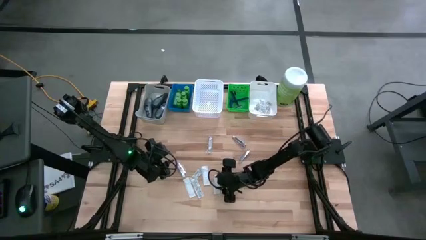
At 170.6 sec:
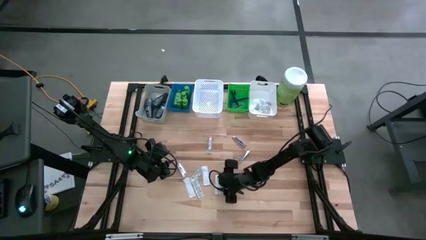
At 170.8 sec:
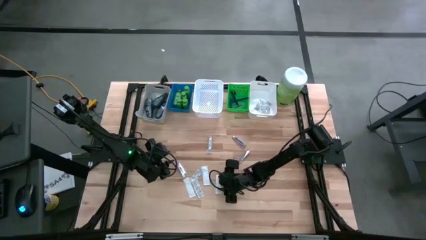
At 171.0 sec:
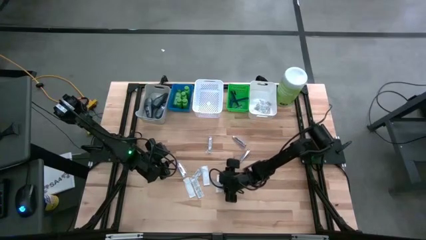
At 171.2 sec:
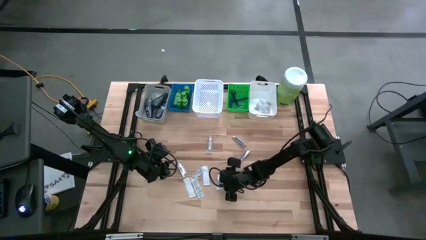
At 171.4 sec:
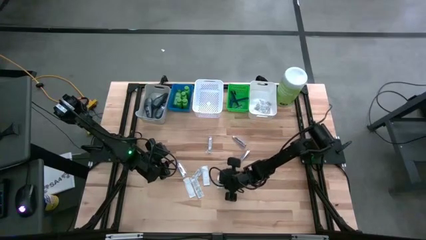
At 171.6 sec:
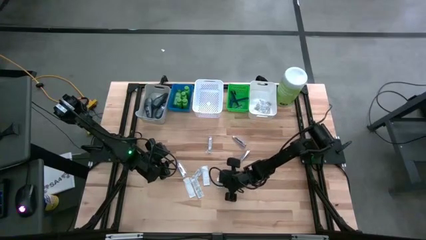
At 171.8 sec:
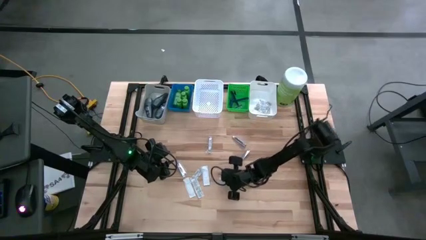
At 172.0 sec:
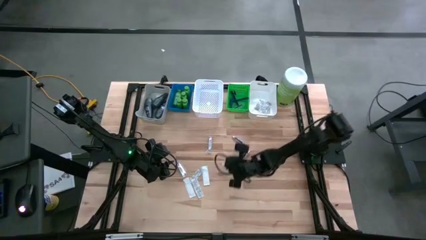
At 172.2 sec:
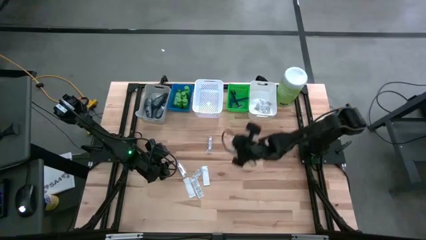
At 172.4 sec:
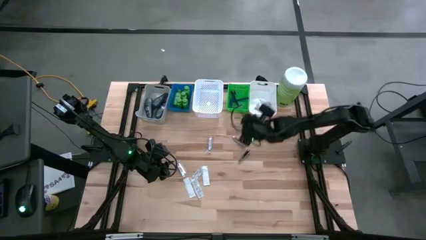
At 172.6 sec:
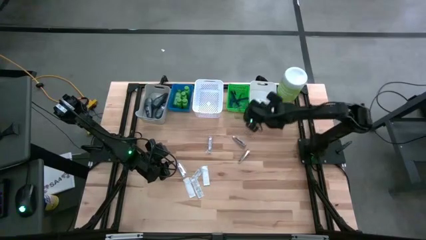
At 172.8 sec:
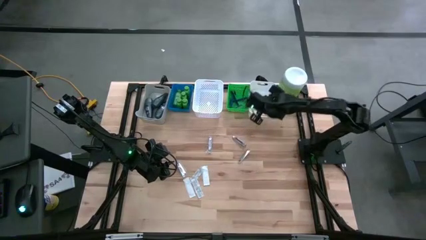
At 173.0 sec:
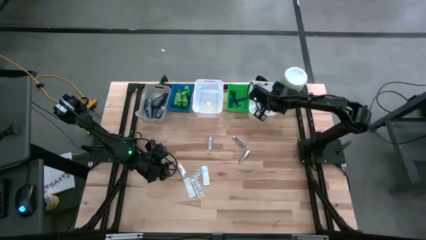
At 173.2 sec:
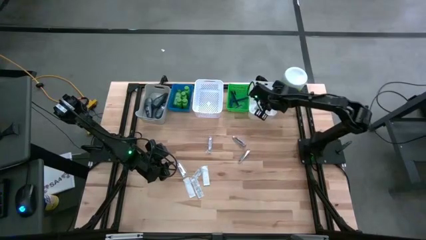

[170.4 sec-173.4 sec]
Task: Pick & Place Travel size toiletries
Put the bandage into the right white bin

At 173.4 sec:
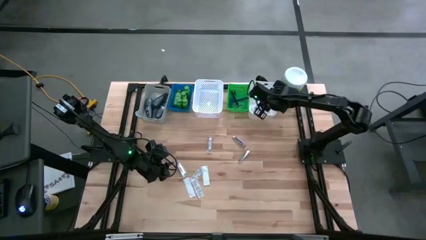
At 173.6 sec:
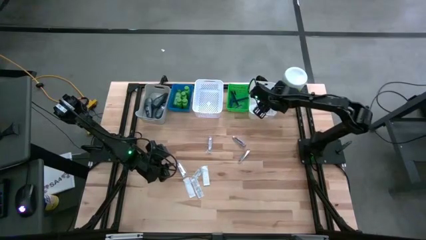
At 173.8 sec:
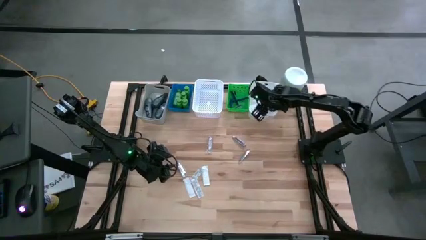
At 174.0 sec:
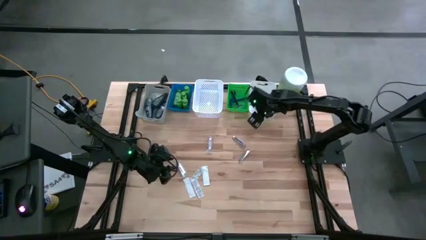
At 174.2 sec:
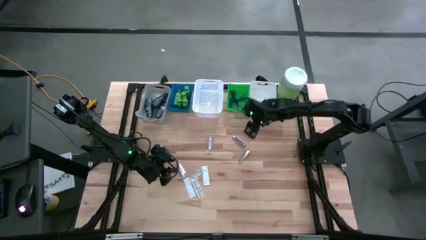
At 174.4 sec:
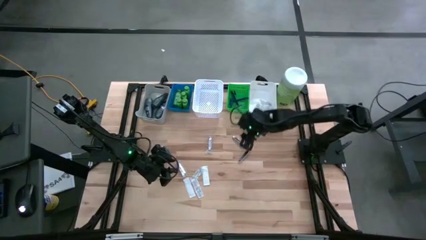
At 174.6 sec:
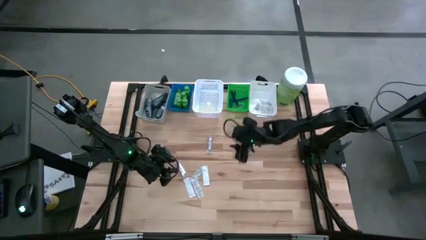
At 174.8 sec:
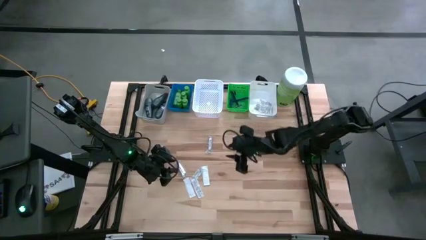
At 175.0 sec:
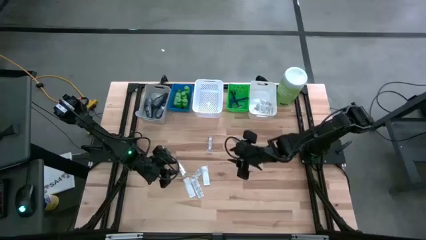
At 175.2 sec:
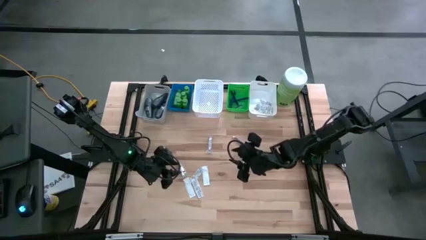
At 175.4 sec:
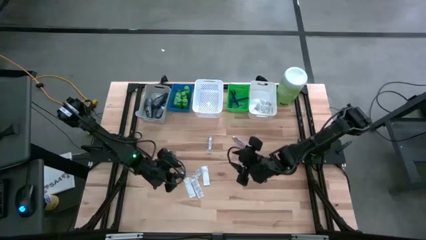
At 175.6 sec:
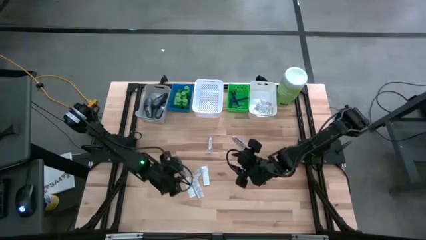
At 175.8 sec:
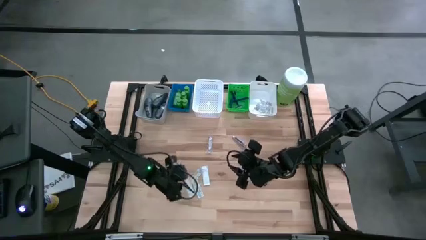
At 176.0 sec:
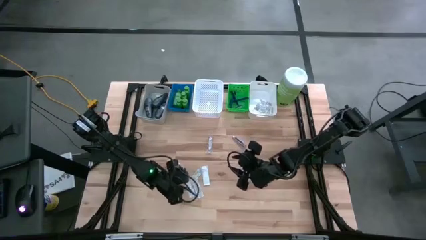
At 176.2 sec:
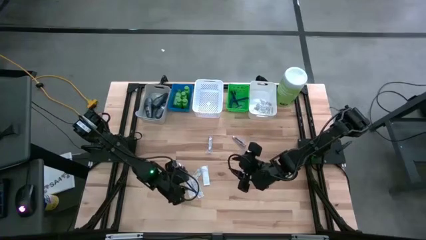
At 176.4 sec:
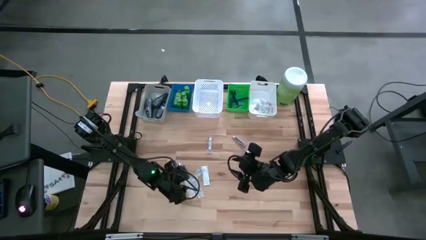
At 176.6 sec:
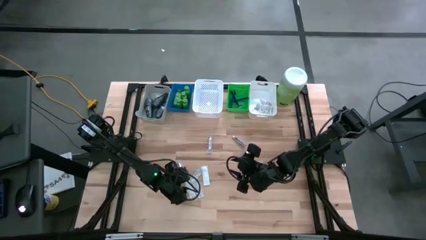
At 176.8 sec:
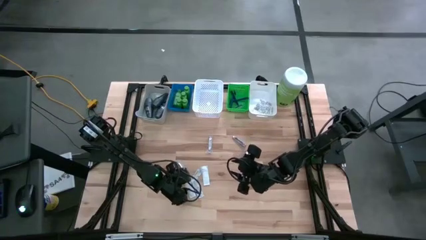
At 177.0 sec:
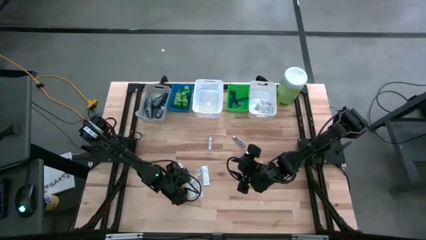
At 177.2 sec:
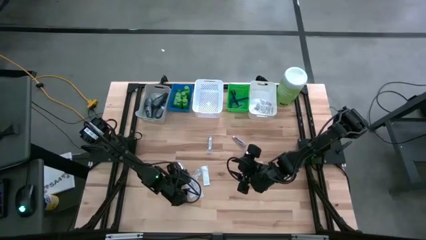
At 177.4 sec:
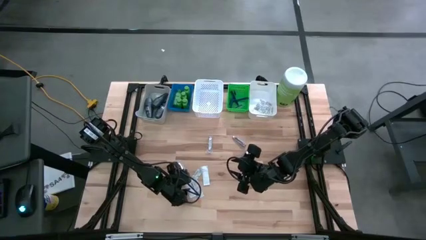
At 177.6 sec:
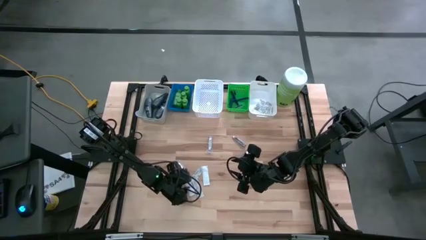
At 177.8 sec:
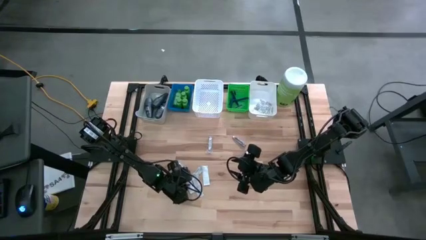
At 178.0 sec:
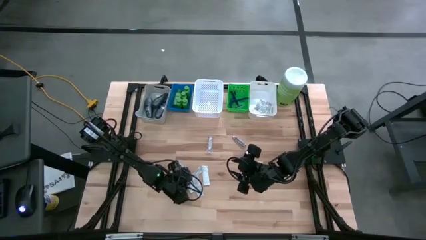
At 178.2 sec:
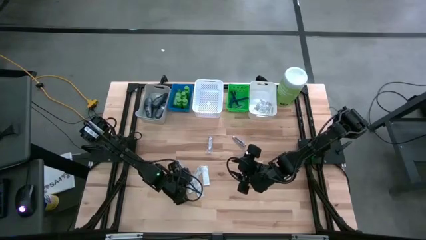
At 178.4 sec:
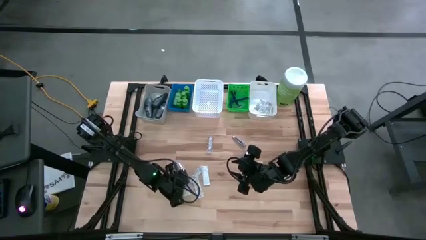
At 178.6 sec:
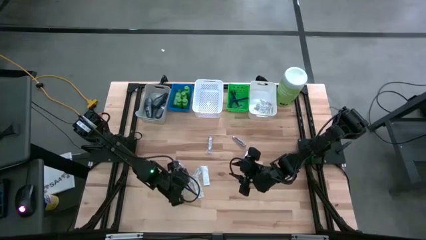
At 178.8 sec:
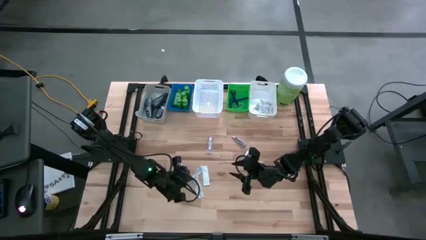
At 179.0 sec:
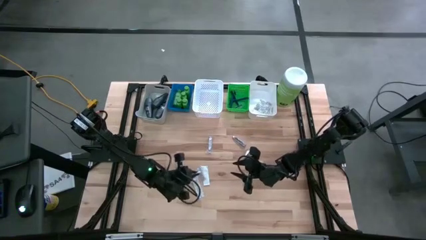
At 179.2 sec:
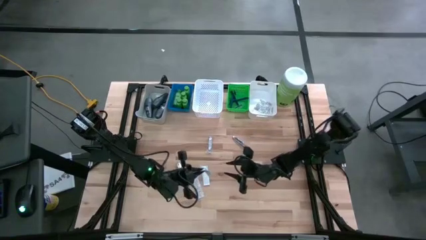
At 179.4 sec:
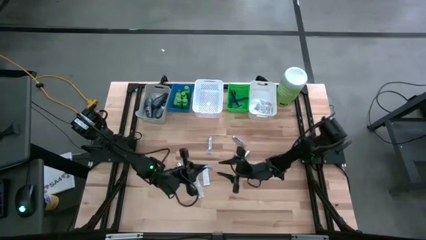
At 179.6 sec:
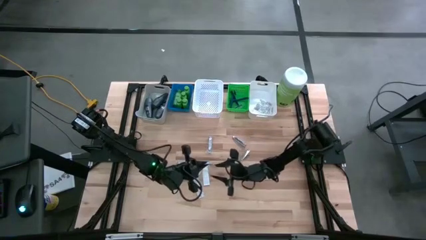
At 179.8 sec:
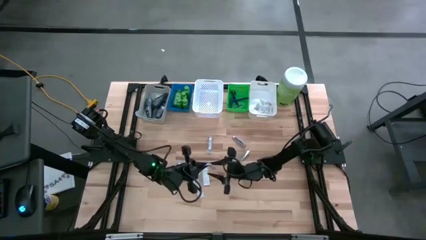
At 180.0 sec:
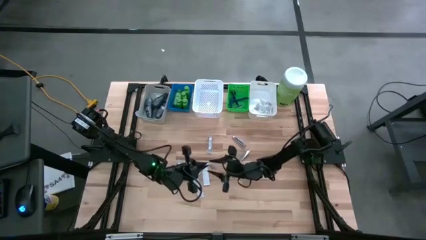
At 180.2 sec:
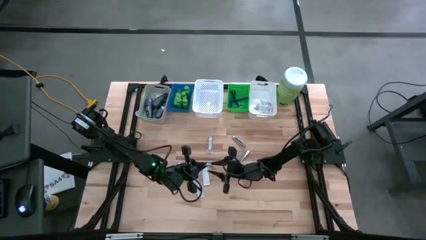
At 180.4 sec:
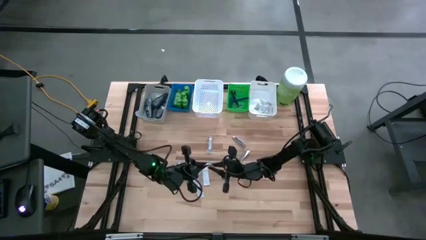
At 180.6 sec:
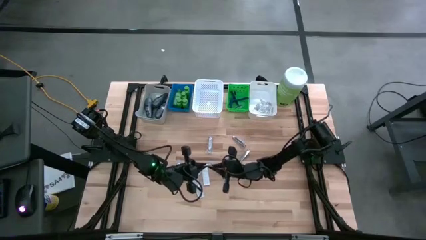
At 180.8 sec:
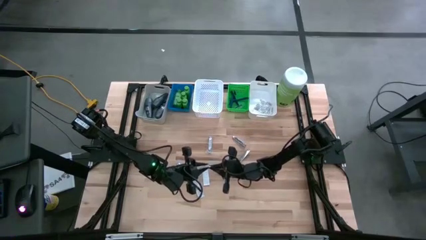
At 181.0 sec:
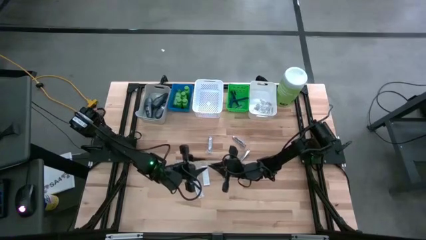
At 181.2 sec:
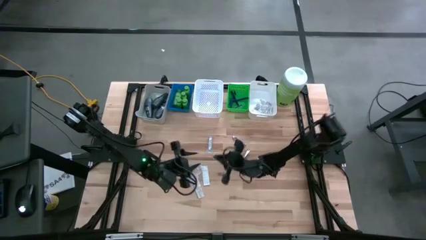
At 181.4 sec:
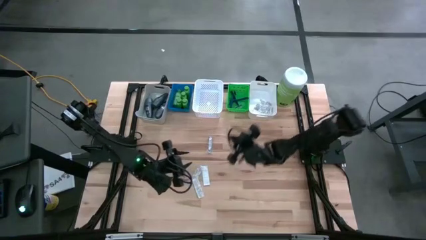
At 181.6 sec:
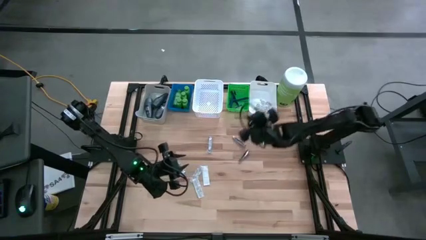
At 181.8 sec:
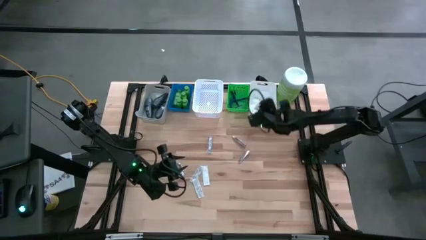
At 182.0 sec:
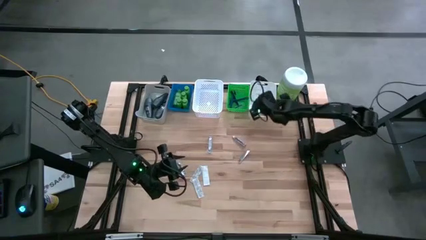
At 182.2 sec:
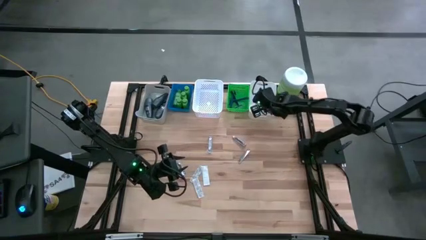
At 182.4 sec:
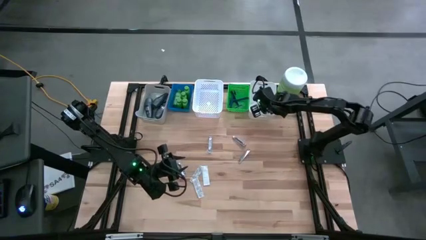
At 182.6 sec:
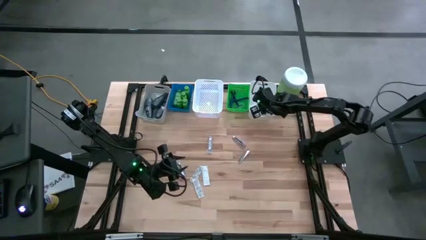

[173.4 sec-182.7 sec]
Put the bandage into the right white bin

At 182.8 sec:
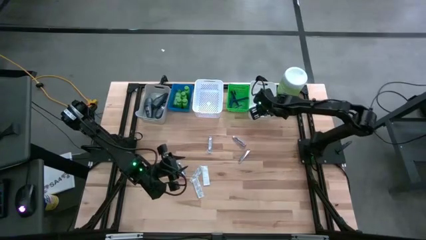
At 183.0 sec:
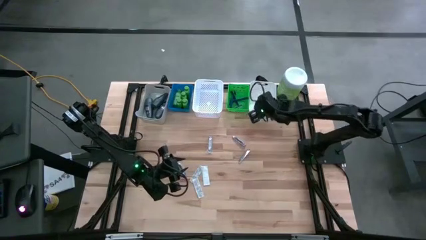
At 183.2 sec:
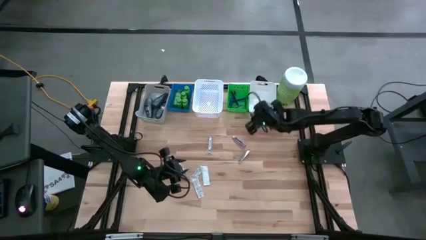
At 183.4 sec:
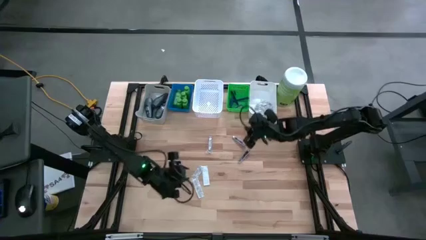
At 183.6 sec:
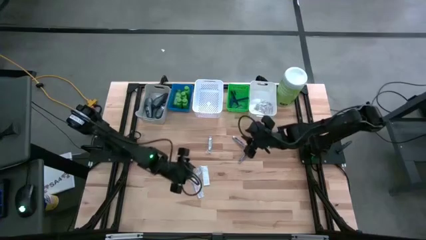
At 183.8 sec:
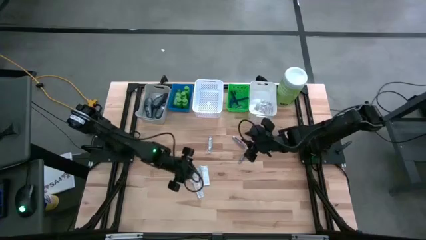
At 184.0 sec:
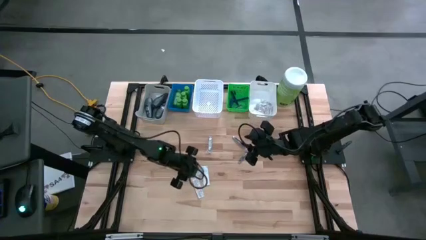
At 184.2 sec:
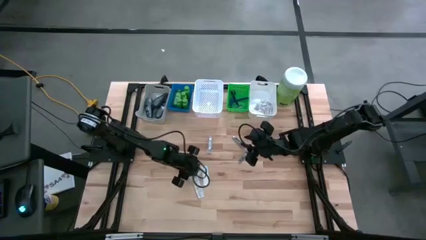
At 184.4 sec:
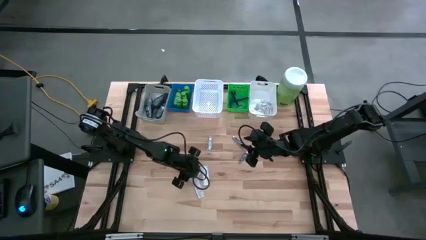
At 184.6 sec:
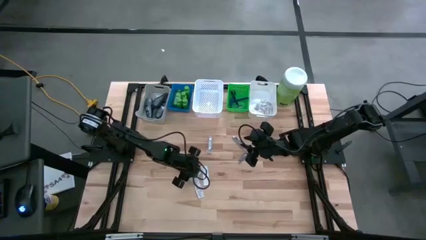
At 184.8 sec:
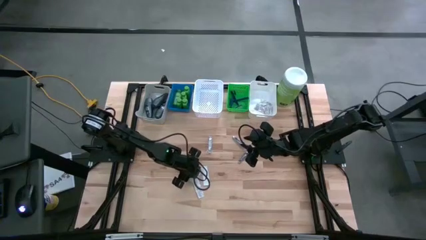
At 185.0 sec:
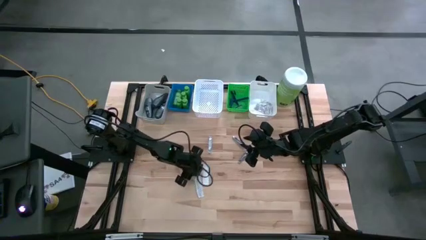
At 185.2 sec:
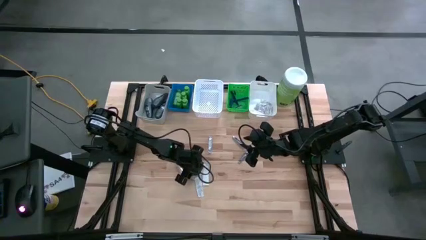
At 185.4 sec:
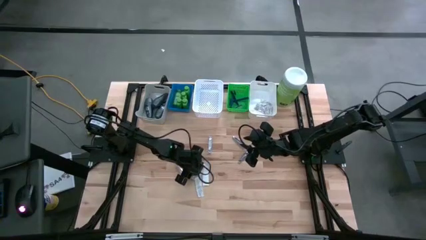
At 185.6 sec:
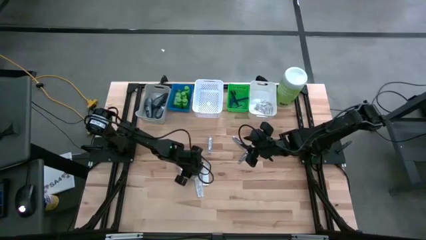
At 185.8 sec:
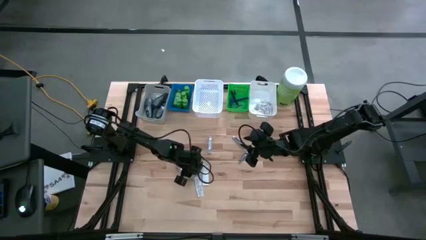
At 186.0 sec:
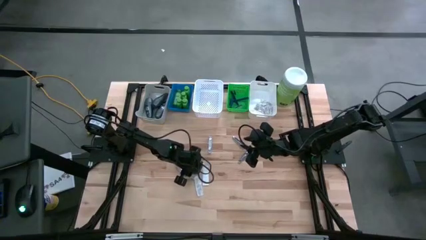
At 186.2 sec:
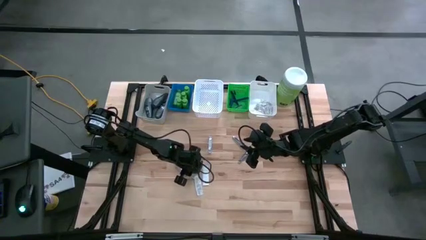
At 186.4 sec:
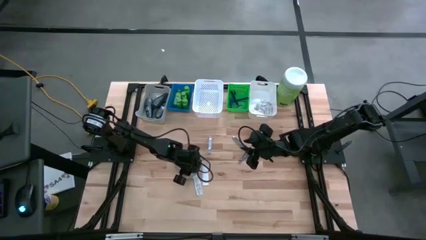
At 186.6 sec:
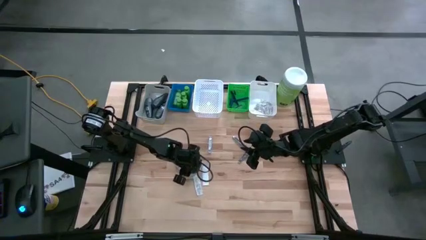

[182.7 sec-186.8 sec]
Put the bandage into the right white bin
